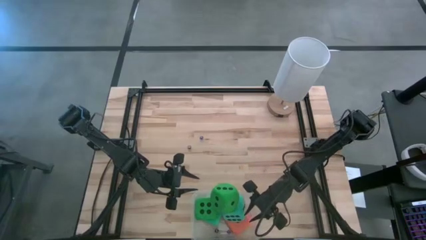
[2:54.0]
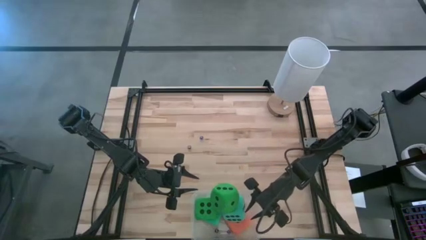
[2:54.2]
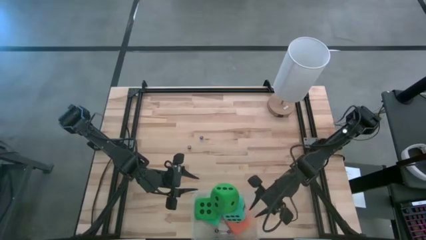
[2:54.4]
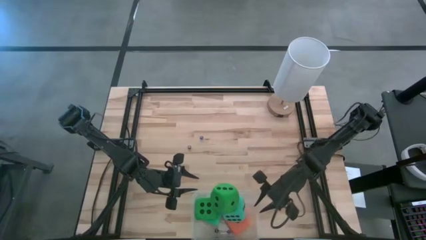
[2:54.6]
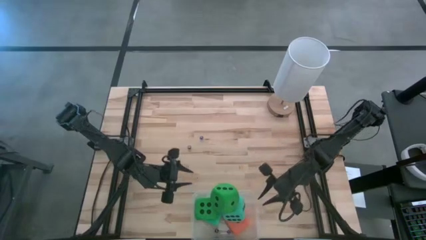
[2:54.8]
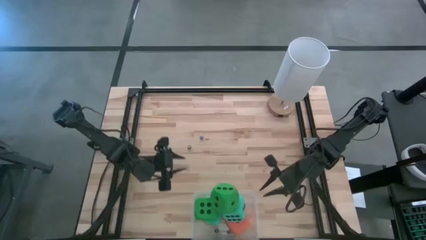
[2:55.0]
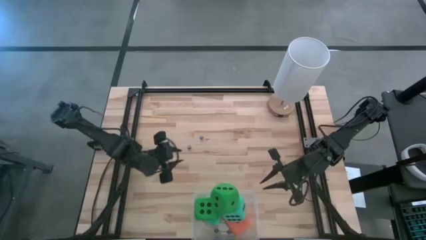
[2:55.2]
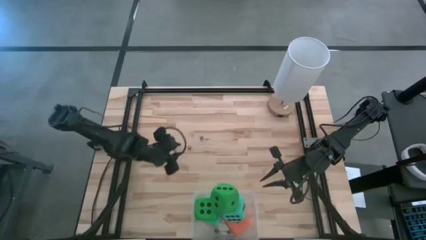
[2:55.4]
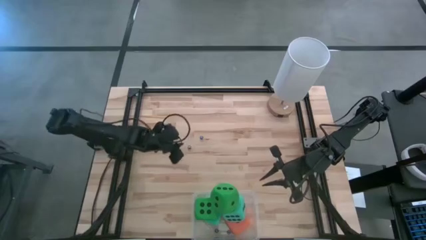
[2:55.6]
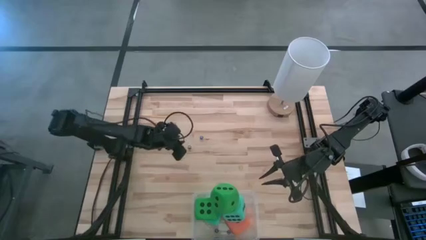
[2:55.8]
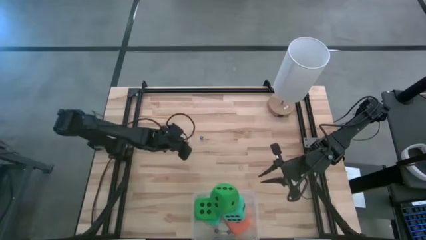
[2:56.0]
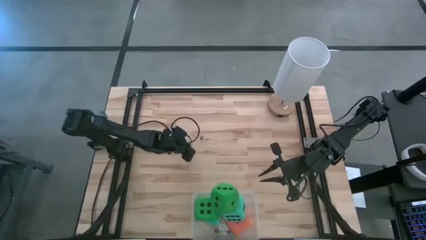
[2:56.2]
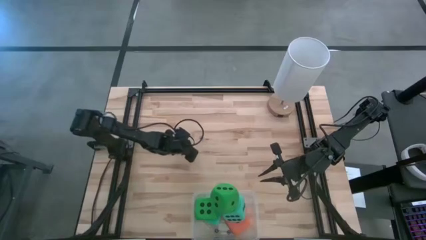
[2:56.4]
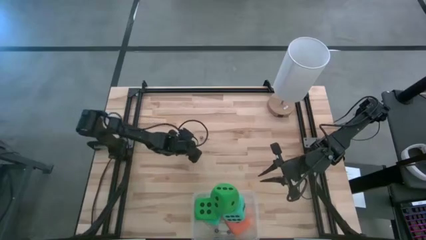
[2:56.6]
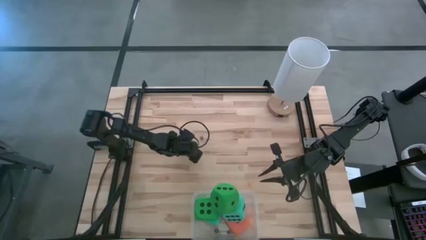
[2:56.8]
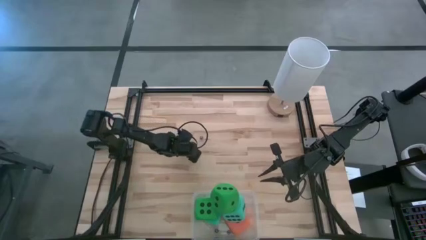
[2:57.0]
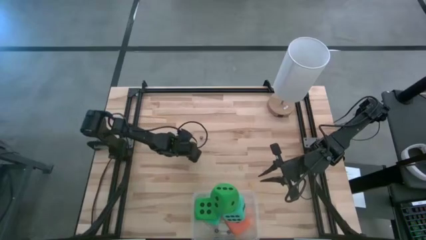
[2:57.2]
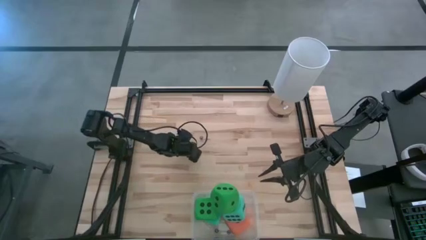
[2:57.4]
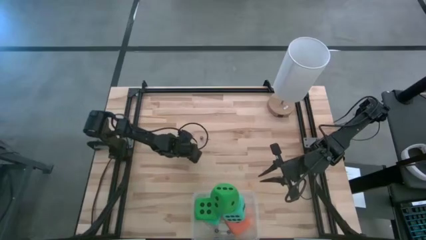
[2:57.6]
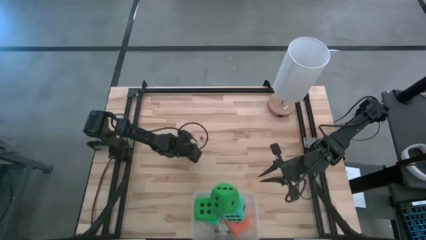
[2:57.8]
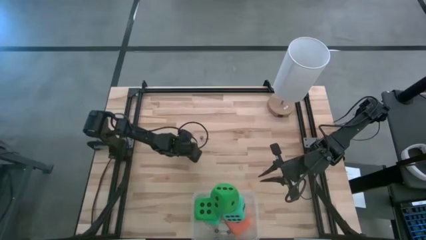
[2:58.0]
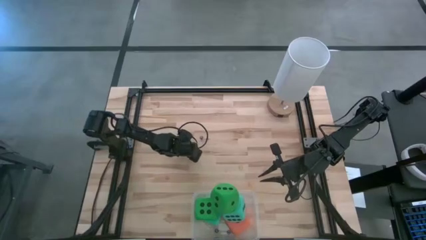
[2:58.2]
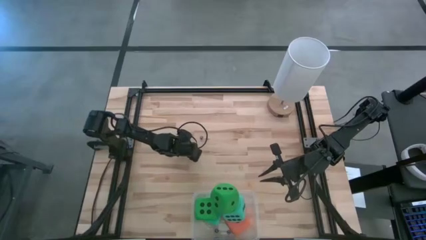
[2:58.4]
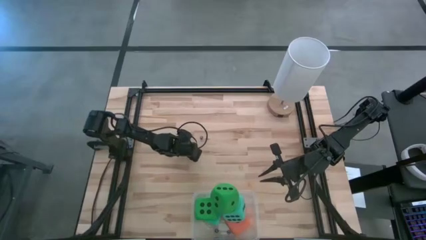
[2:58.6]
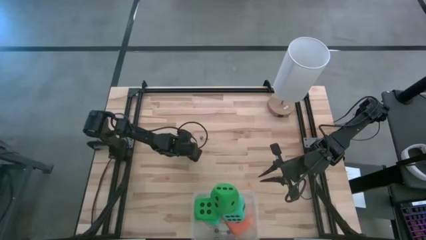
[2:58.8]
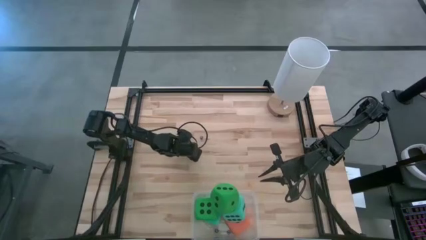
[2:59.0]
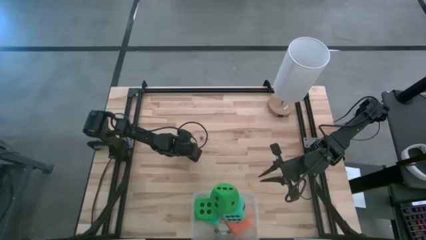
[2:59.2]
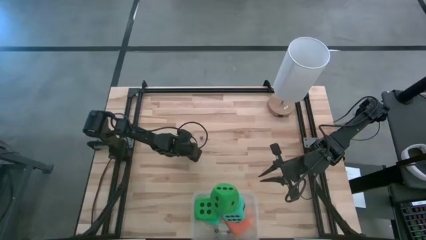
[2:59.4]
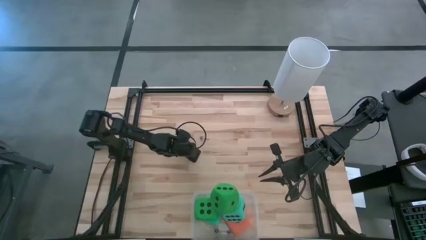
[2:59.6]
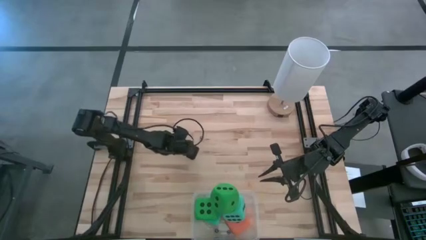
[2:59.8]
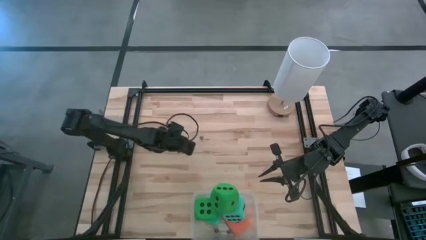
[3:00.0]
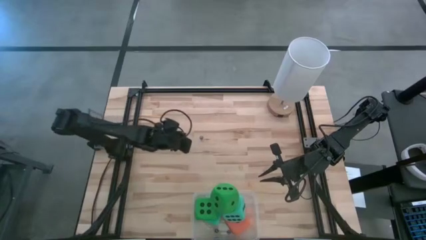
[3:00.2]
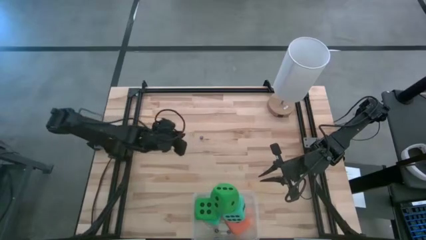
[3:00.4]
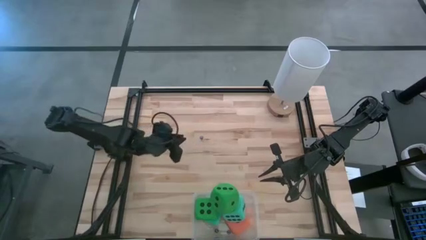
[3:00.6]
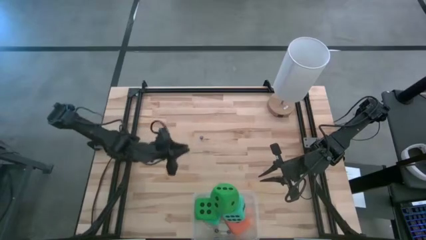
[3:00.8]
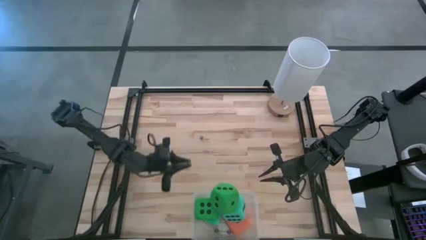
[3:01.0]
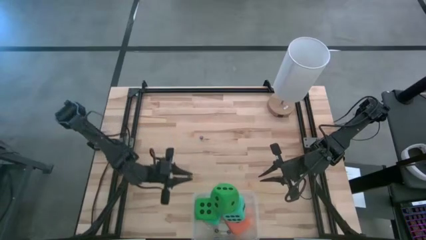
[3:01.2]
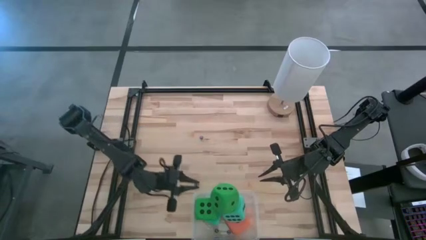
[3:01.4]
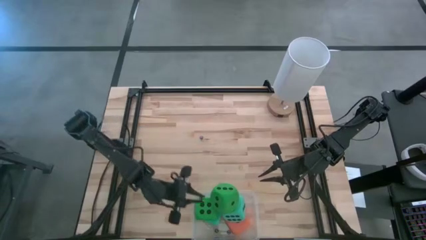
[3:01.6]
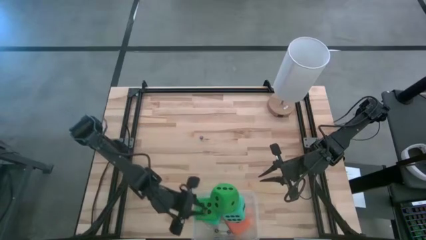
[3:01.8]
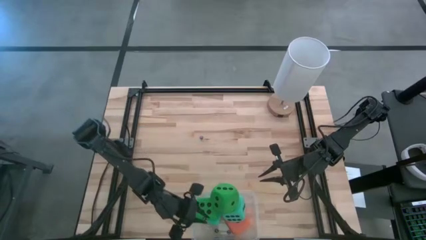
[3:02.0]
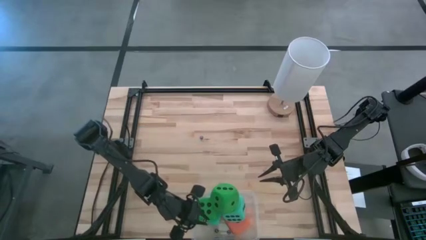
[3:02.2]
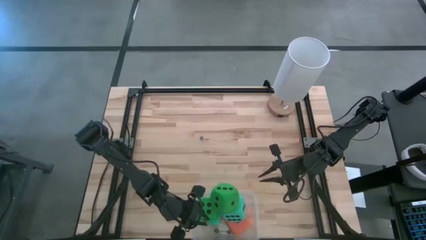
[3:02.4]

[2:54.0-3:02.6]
Task: Pick & Place Dice
Put the small black dice into the transparent bin

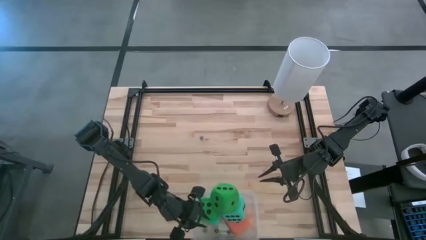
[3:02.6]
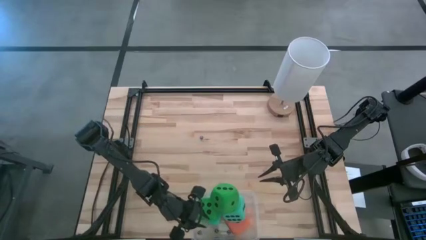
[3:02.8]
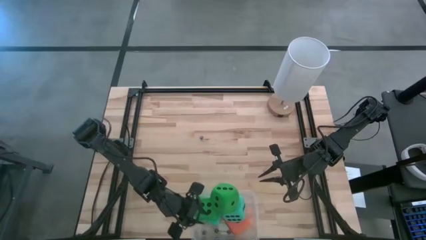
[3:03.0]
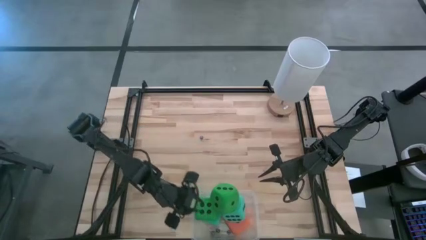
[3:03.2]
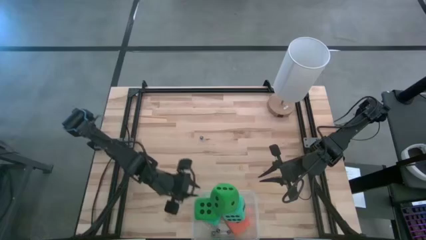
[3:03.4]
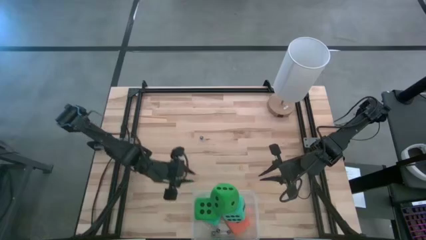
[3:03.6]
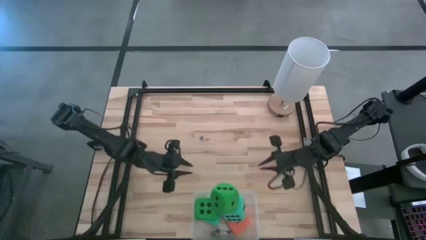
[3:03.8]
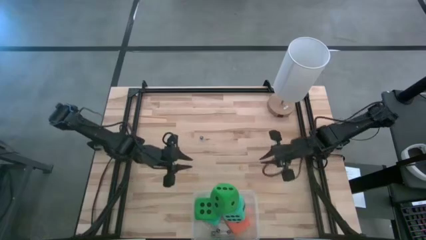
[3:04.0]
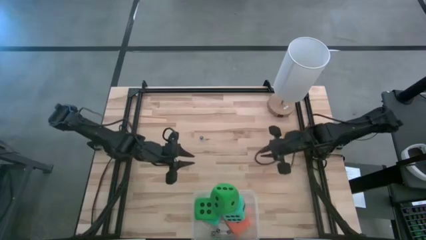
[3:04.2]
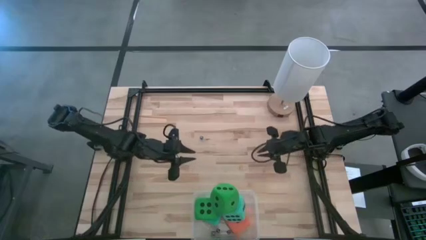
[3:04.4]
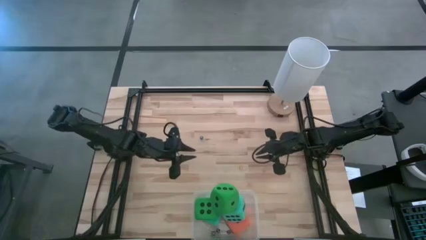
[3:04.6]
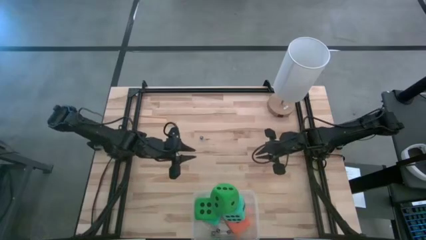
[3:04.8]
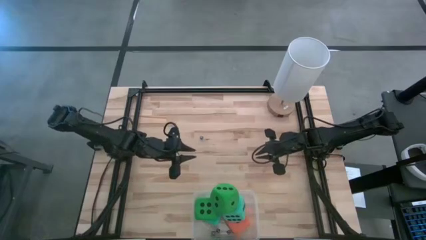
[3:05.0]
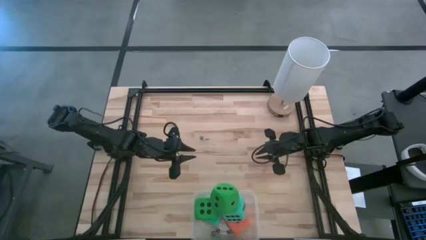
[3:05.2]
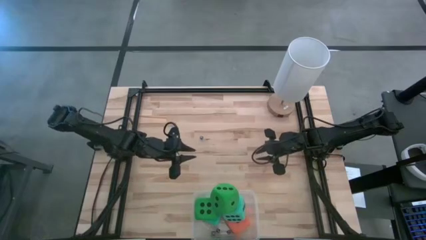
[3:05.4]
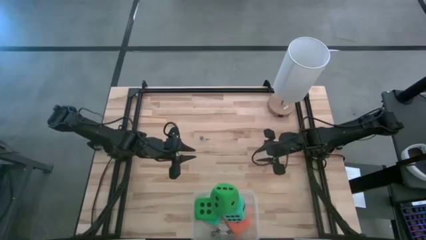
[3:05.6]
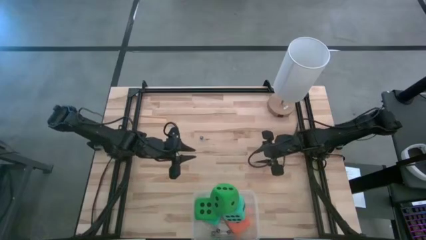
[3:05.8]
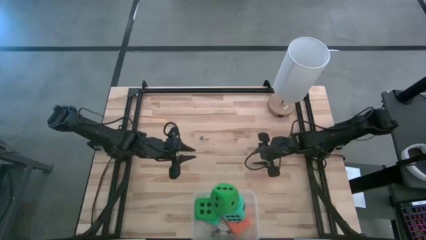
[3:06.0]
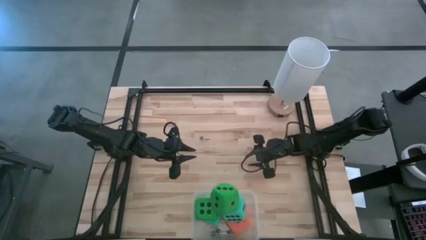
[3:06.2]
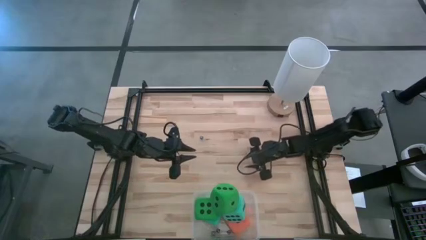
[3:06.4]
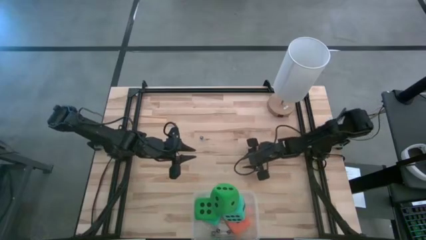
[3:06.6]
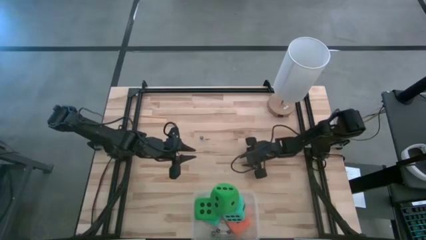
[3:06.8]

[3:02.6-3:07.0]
Put the small yellow dice into the transparent bin

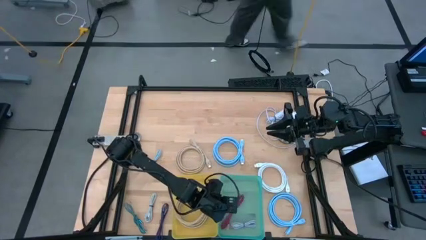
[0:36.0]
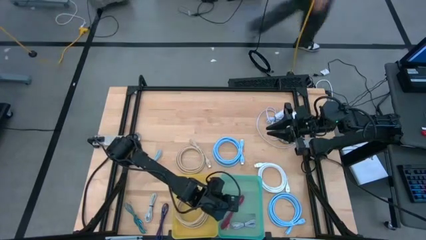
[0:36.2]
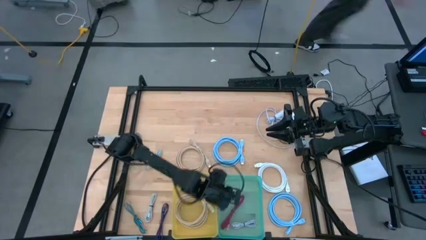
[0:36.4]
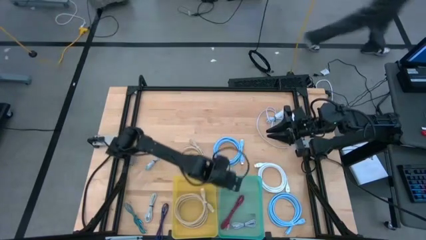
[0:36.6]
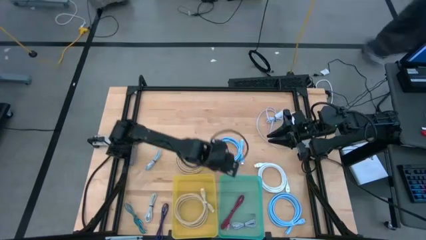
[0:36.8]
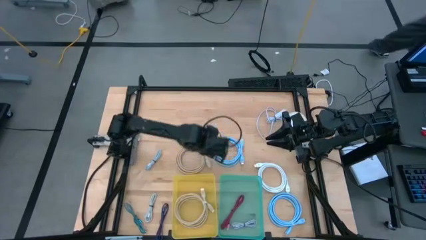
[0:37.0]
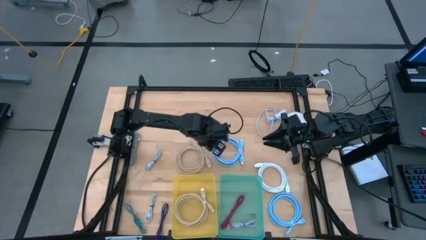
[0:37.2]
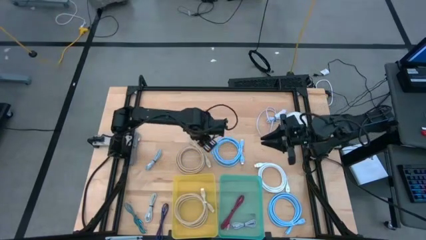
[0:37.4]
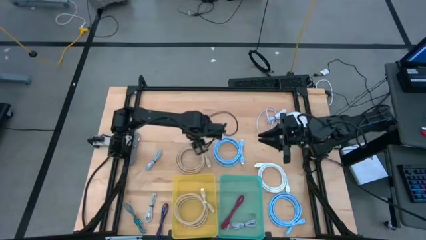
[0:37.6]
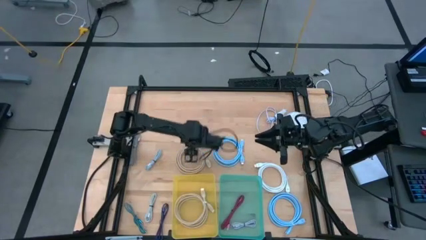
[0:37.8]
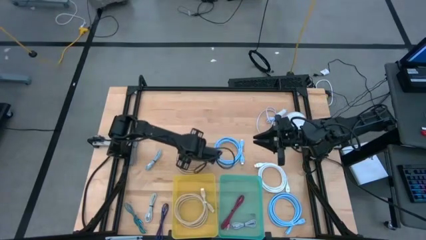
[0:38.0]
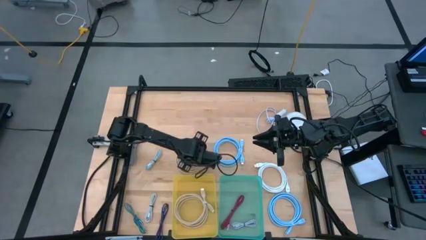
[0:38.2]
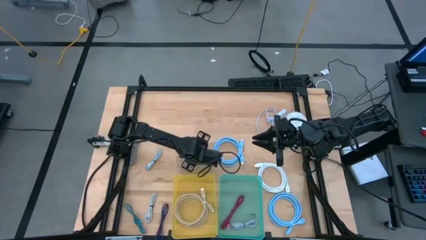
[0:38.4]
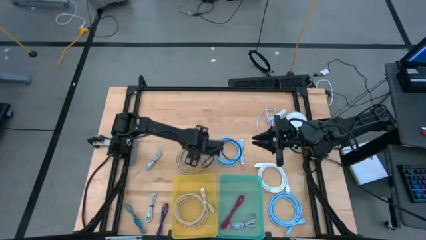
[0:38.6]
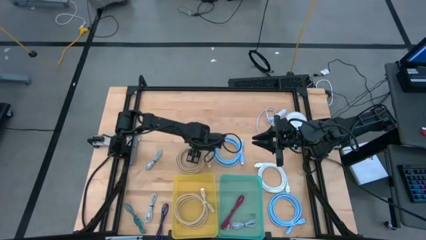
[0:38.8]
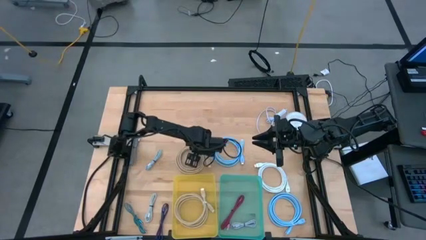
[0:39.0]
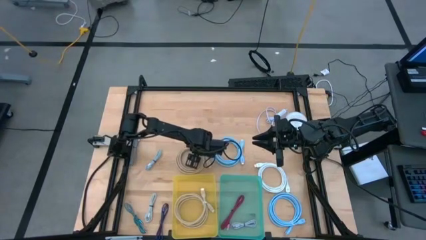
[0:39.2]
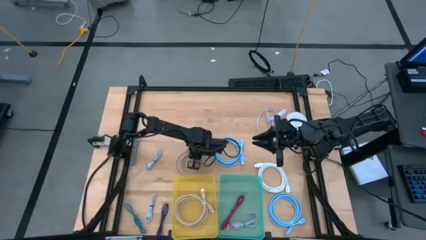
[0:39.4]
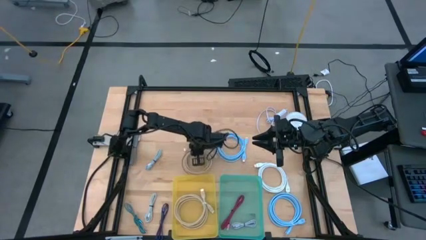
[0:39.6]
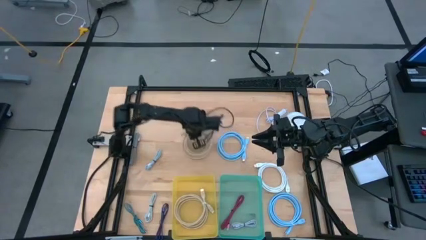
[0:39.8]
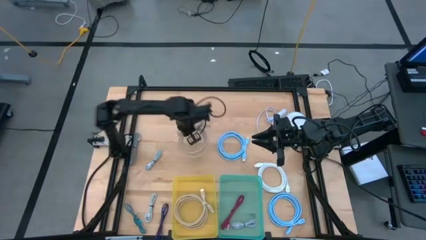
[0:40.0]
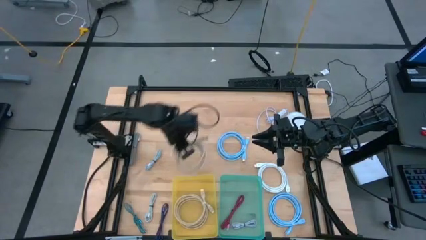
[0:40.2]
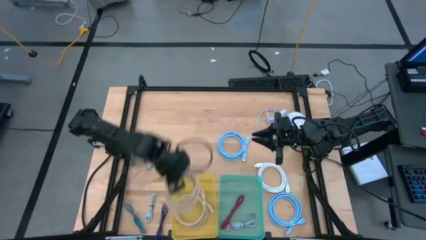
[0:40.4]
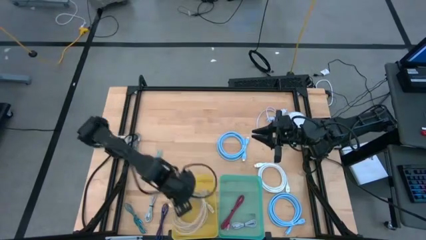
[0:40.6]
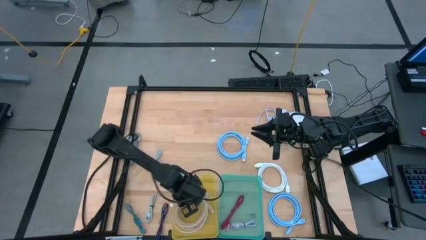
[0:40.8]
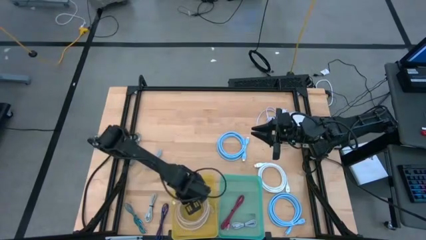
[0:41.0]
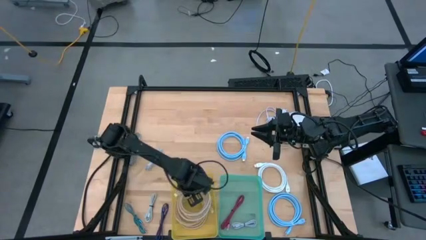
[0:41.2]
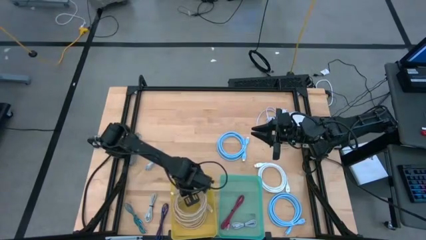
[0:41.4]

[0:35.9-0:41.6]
Task: Pick & Place USB Port
Put the large brown charger cable into the yellow bin
